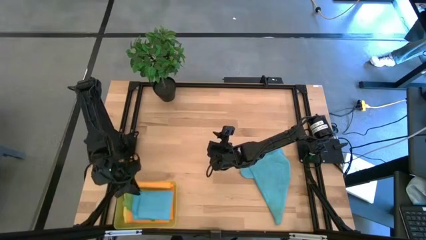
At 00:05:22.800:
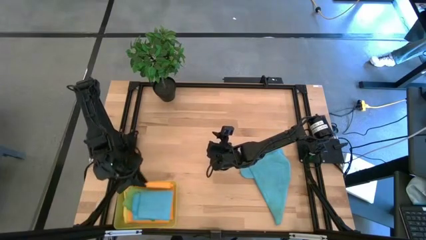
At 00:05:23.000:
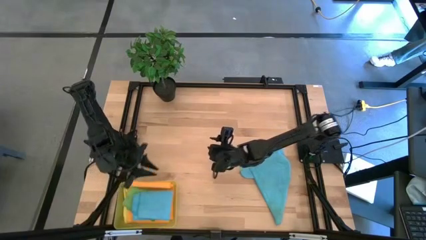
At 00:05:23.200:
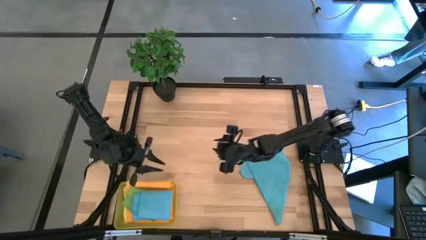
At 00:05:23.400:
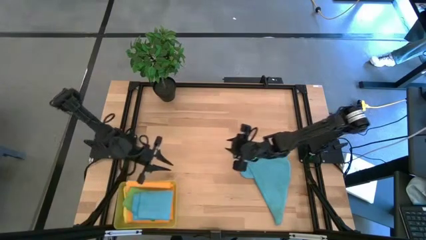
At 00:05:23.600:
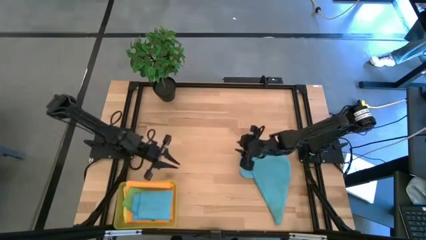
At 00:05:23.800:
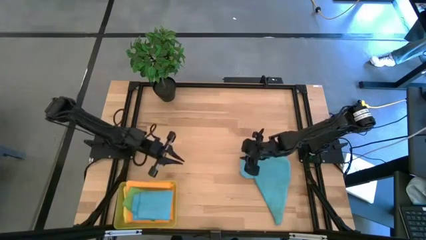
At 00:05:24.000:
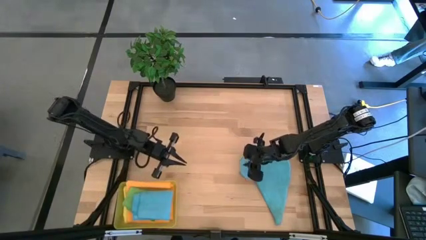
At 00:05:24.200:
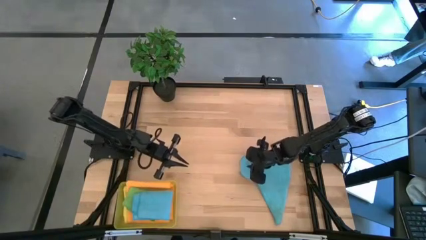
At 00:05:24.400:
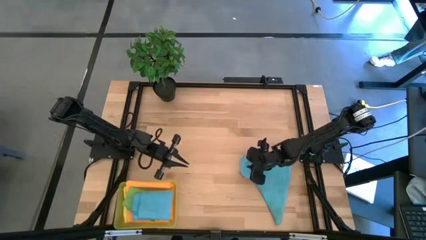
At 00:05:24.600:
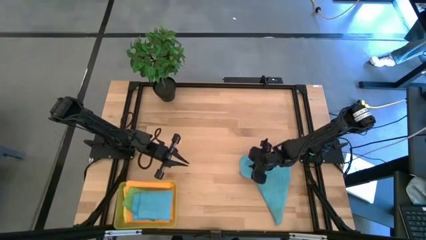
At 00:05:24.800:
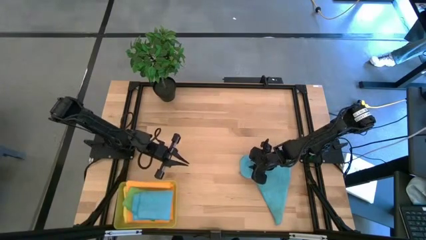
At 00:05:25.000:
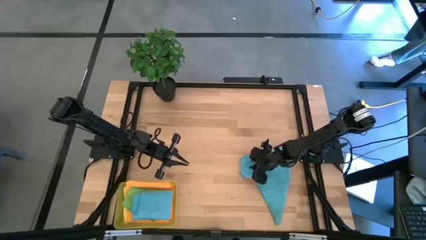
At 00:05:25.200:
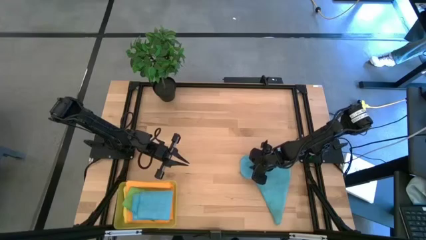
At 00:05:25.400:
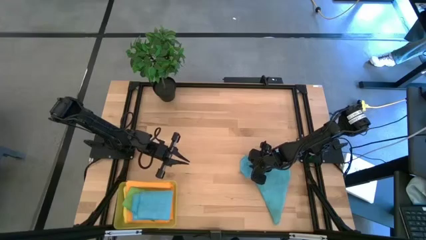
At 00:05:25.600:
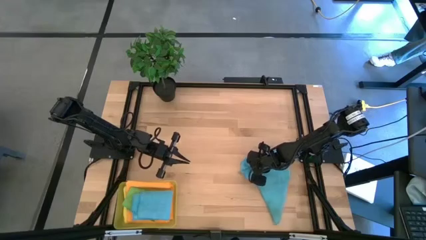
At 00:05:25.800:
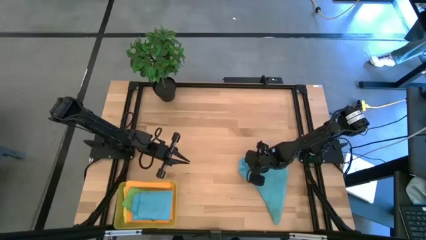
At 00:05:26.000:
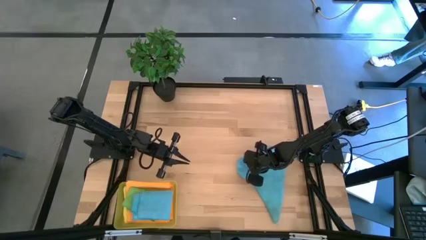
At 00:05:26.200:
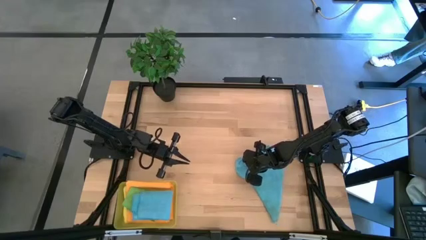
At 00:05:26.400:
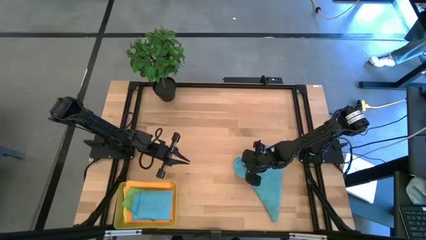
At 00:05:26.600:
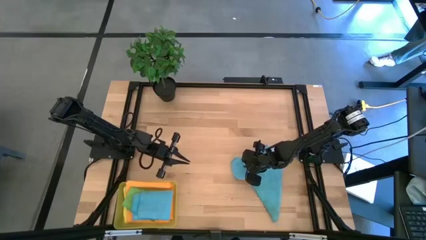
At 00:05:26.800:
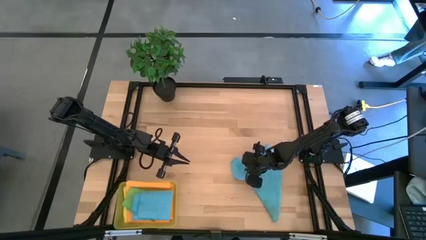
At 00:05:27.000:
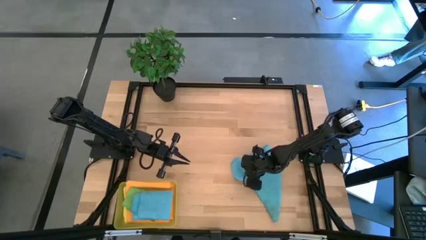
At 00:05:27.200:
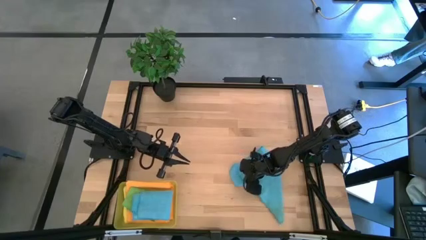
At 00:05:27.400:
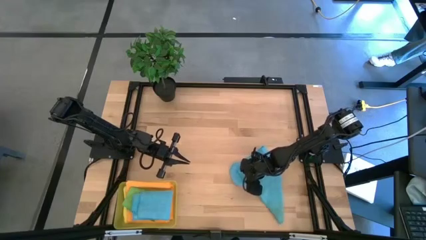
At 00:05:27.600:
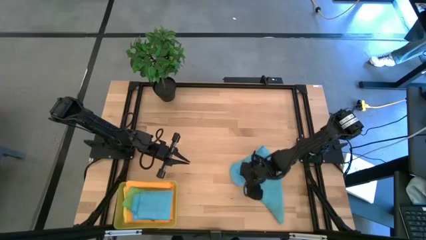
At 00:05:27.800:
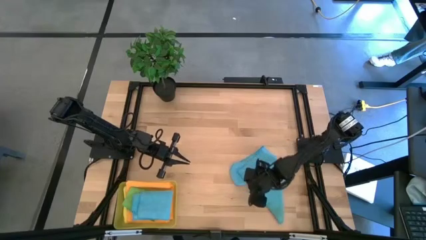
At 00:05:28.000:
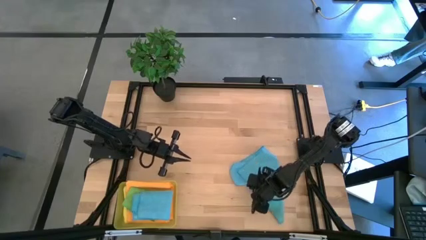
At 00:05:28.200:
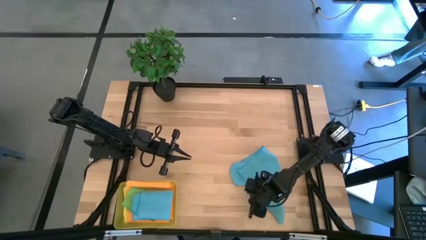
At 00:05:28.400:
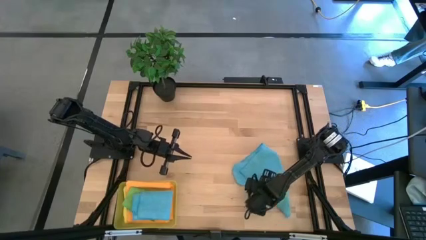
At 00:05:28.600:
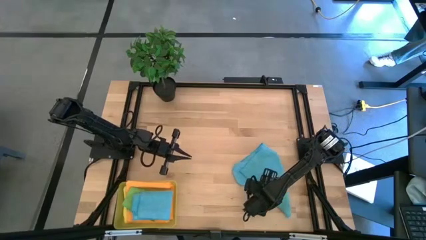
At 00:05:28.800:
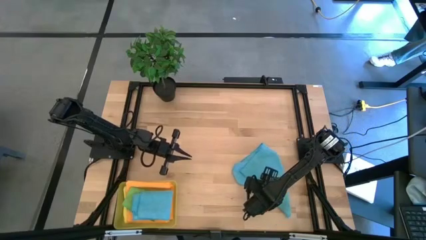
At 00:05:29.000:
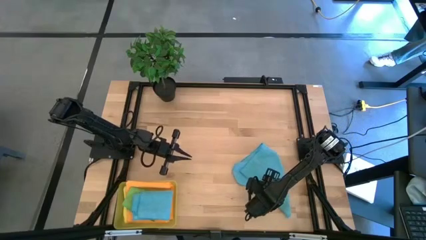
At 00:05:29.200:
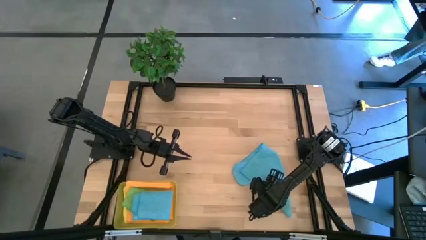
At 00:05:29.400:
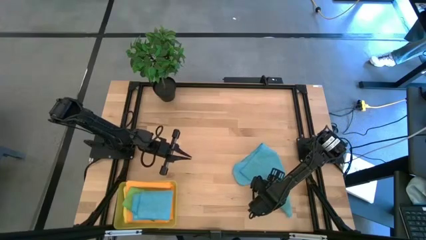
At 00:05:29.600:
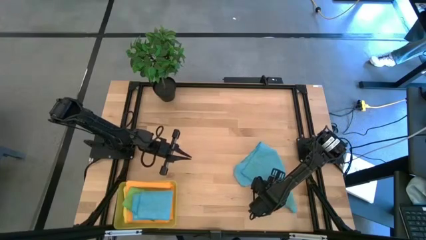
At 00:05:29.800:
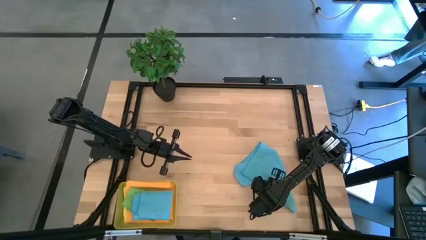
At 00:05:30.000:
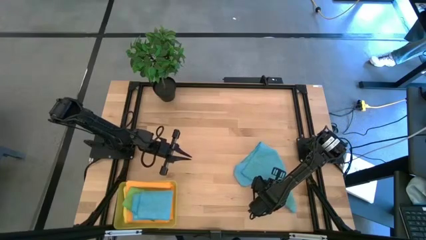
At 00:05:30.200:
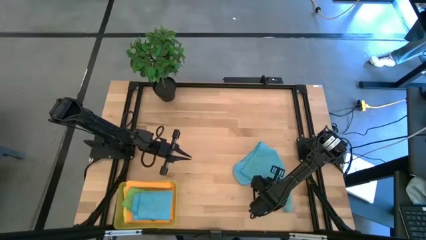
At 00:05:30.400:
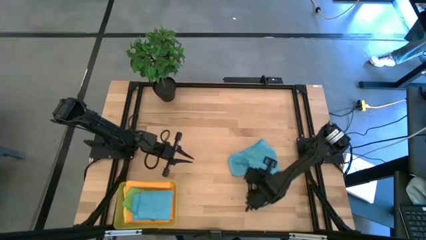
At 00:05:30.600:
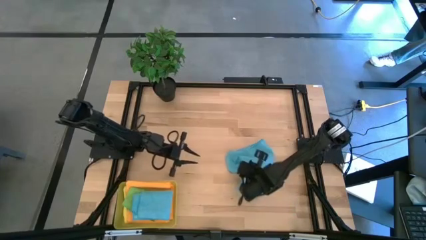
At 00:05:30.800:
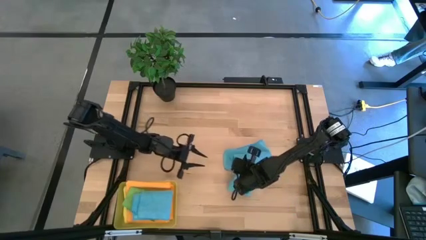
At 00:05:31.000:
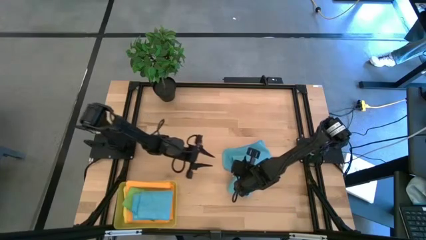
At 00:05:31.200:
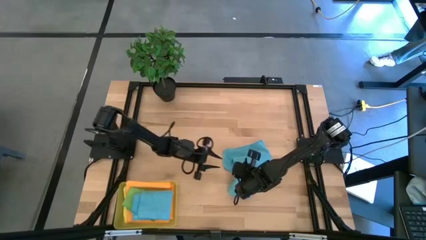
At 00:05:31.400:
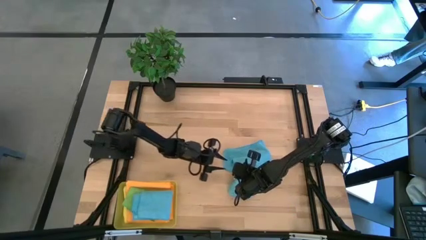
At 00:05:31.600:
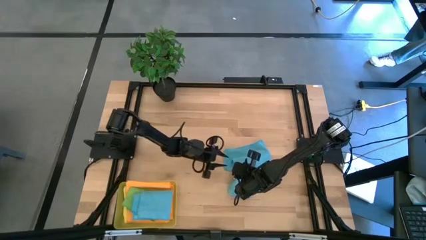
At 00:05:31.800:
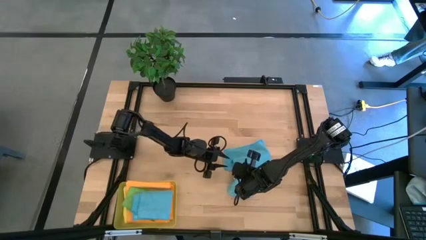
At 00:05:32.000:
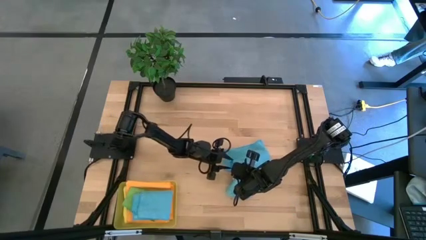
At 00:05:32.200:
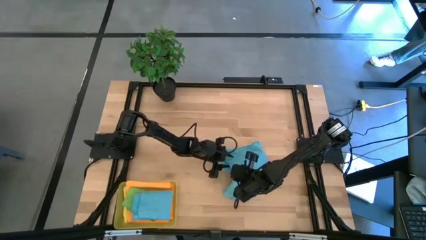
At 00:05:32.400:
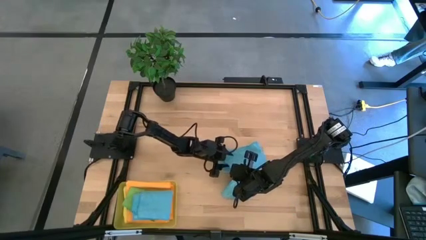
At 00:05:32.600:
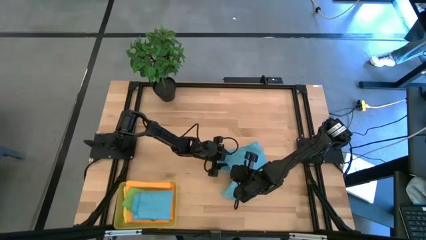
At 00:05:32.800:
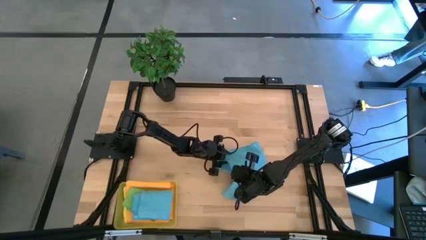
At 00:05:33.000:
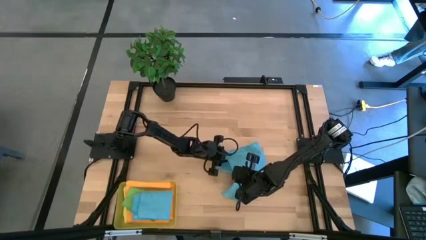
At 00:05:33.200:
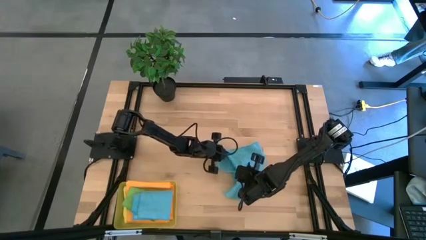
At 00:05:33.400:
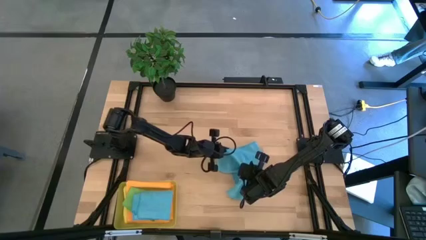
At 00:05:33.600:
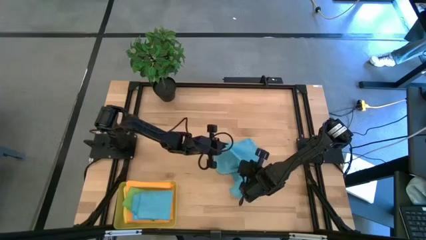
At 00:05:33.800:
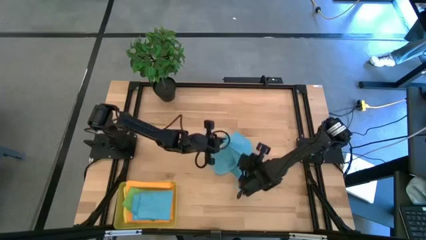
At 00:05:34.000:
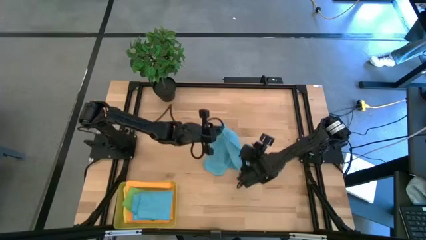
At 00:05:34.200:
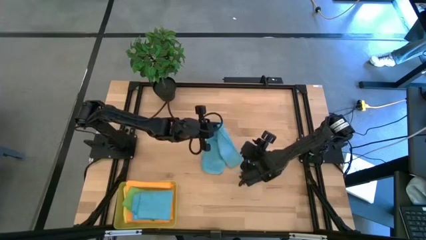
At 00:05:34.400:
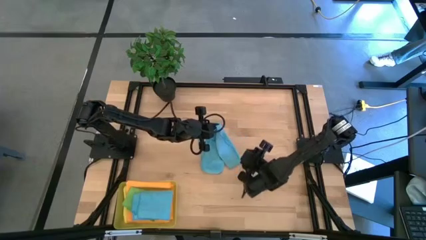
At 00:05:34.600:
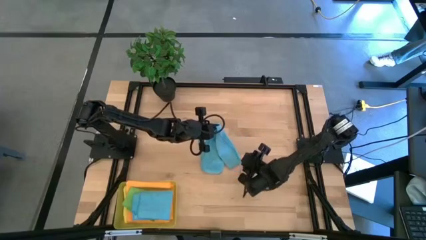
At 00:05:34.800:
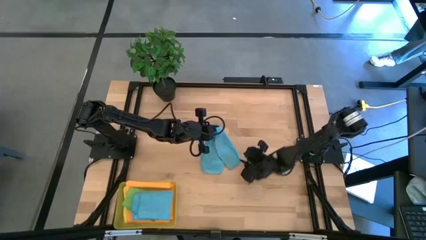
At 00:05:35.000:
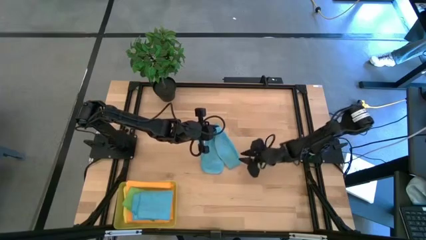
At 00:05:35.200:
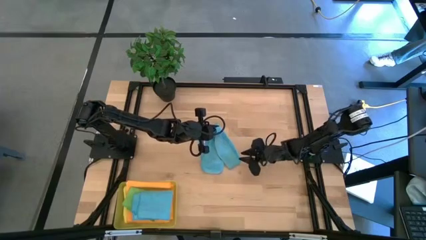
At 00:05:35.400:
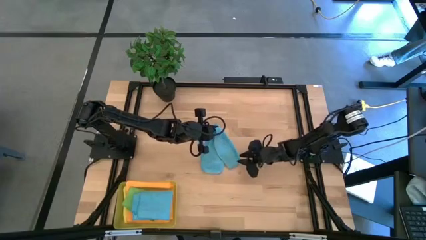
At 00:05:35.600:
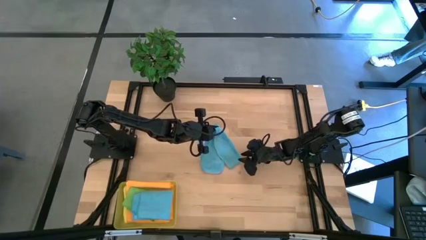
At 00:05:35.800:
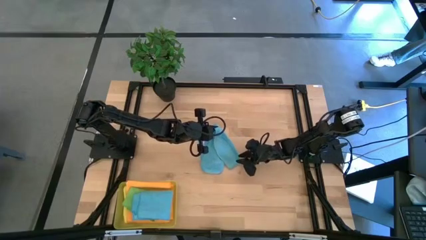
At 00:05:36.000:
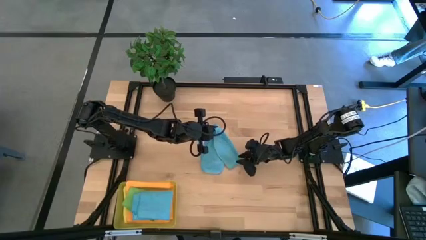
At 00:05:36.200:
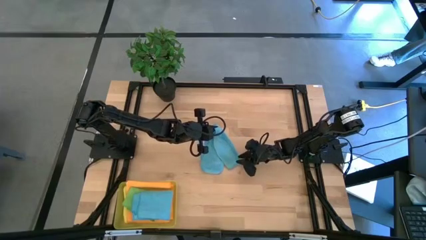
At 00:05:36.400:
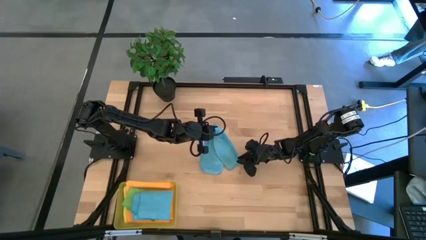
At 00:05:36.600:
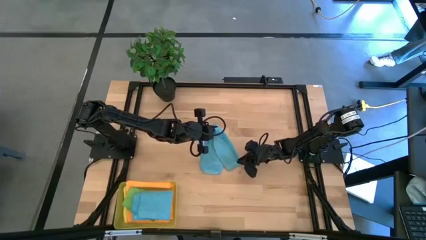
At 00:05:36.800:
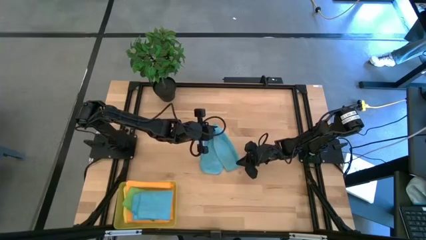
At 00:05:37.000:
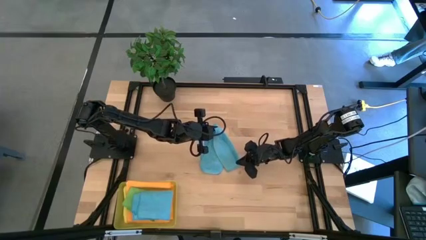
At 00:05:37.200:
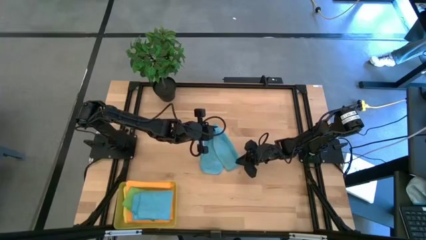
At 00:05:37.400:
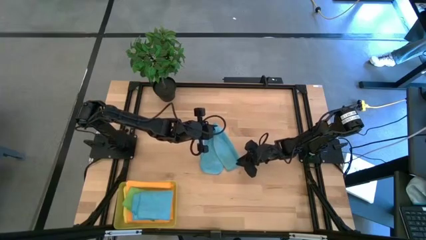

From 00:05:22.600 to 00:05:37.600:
Task: Fold microfiber towels
Fold the blue microfiber cloth
